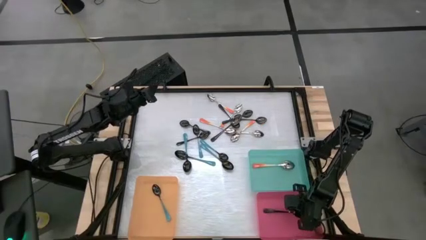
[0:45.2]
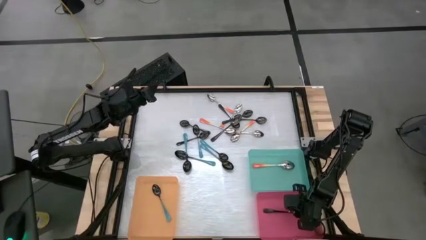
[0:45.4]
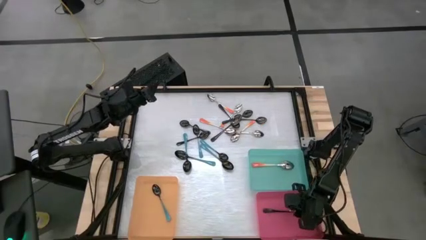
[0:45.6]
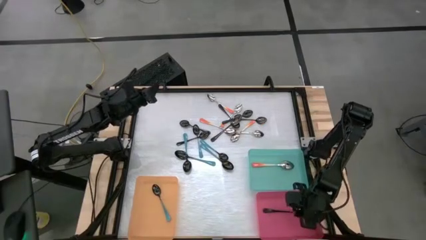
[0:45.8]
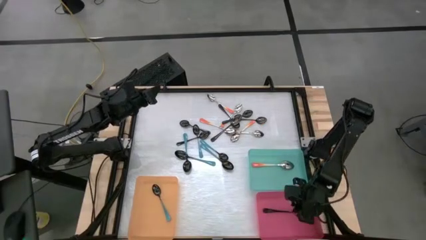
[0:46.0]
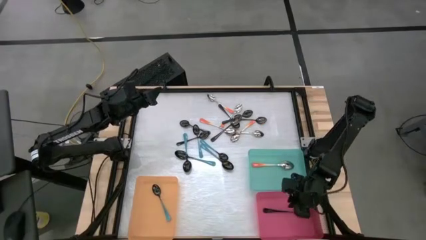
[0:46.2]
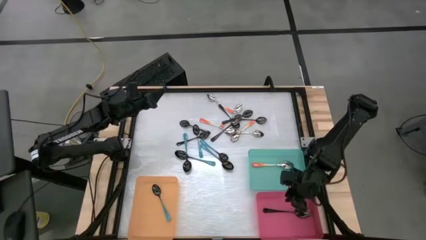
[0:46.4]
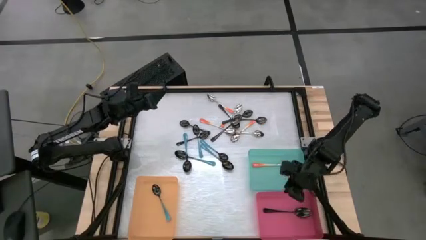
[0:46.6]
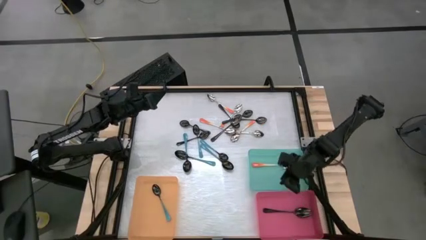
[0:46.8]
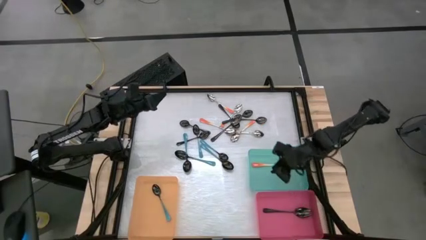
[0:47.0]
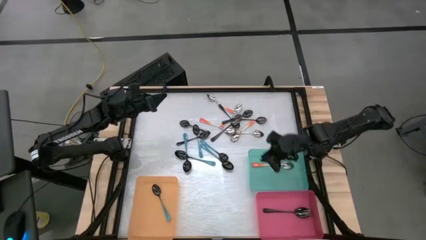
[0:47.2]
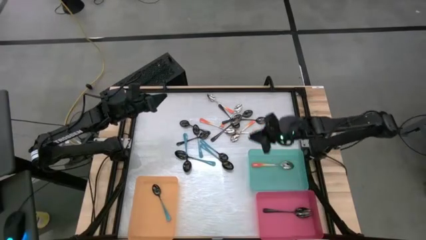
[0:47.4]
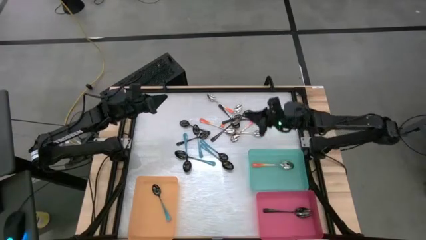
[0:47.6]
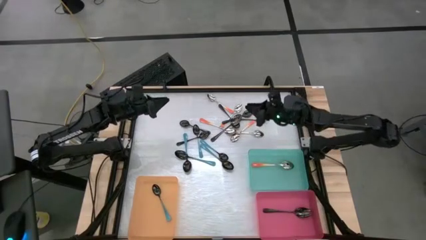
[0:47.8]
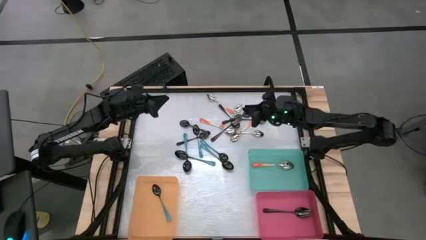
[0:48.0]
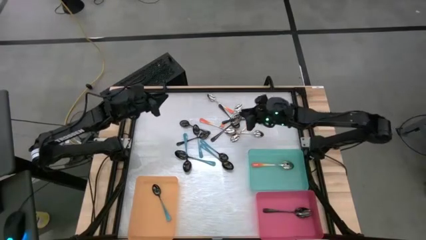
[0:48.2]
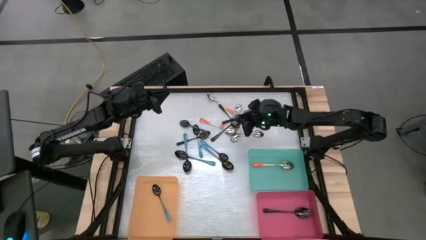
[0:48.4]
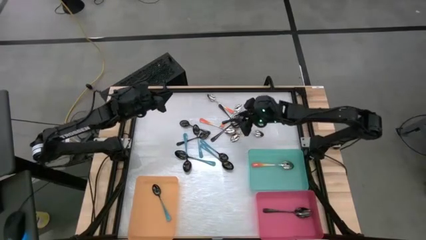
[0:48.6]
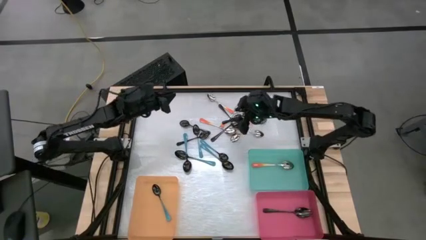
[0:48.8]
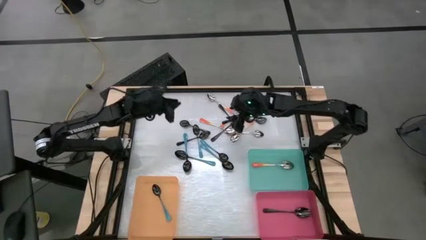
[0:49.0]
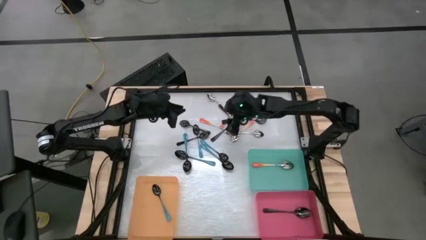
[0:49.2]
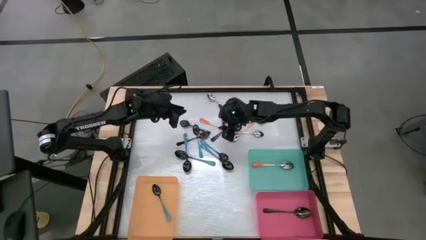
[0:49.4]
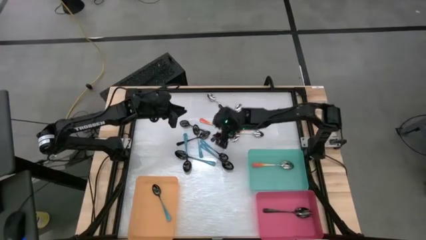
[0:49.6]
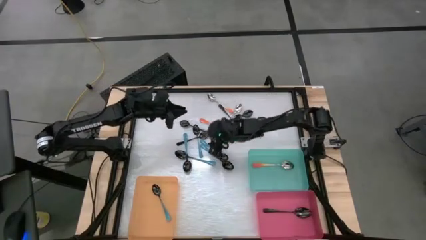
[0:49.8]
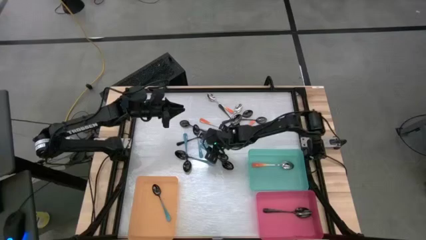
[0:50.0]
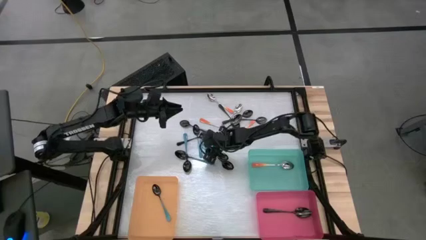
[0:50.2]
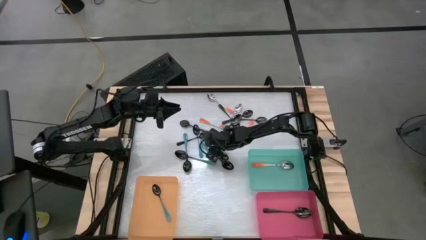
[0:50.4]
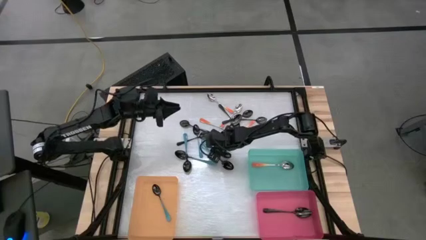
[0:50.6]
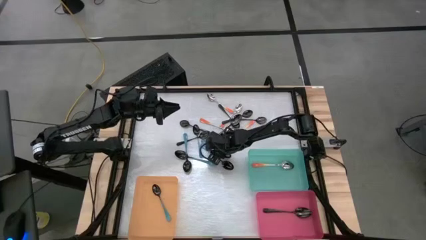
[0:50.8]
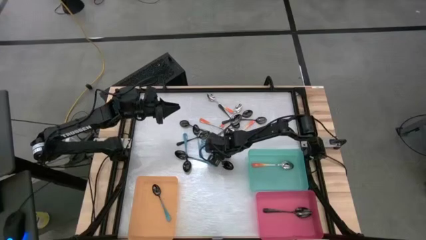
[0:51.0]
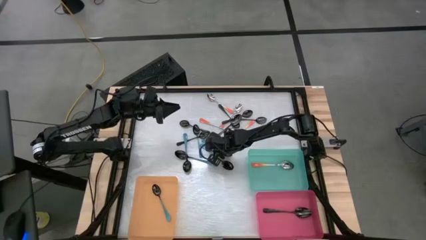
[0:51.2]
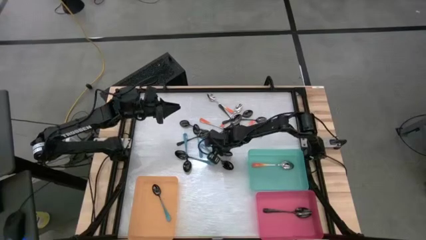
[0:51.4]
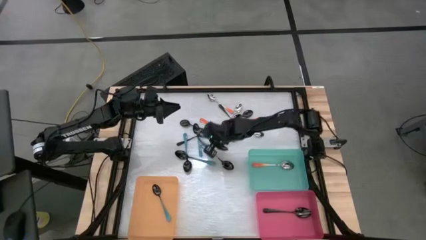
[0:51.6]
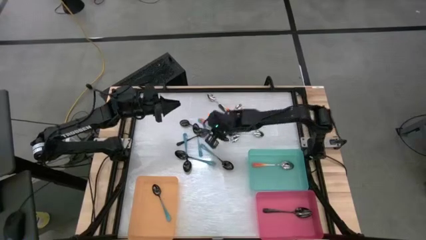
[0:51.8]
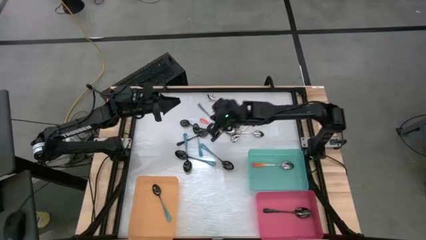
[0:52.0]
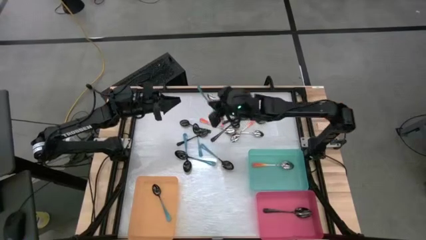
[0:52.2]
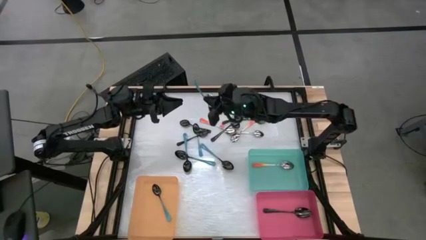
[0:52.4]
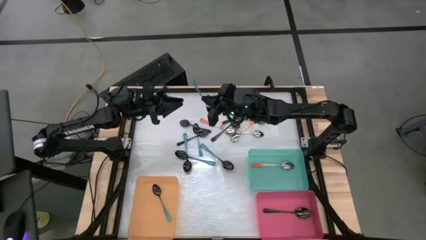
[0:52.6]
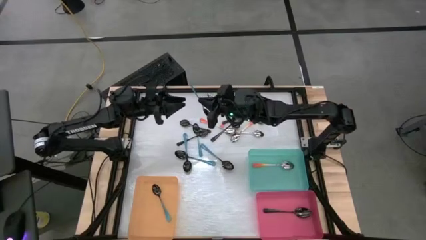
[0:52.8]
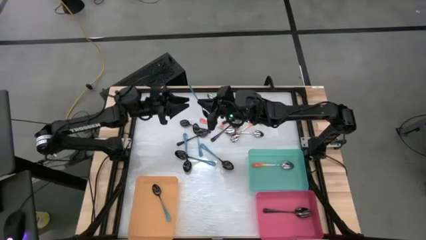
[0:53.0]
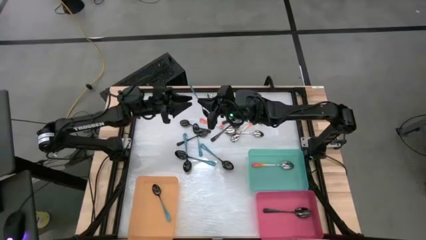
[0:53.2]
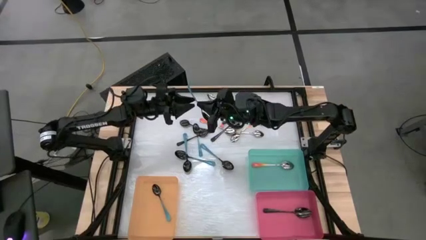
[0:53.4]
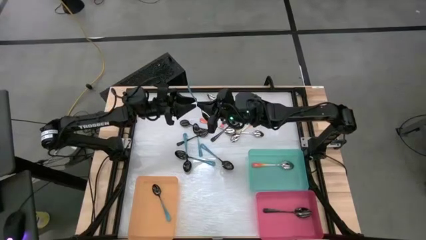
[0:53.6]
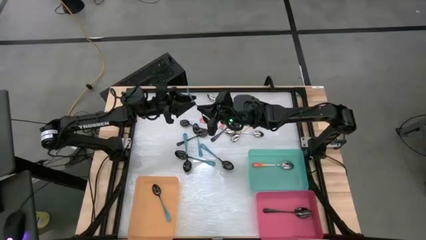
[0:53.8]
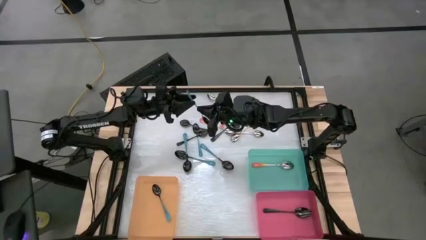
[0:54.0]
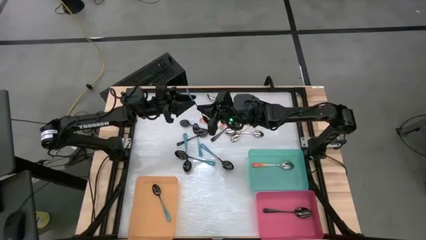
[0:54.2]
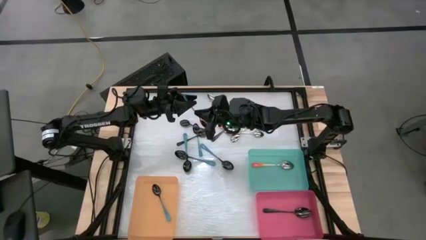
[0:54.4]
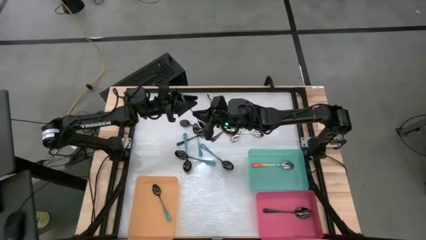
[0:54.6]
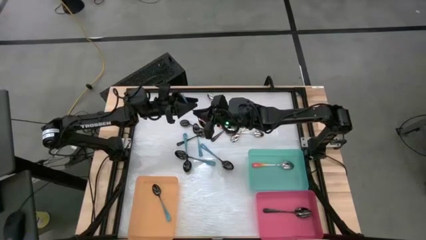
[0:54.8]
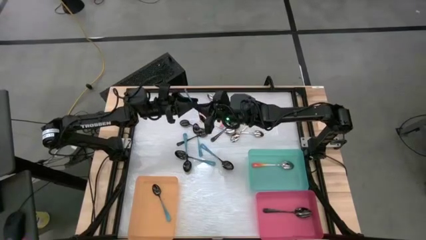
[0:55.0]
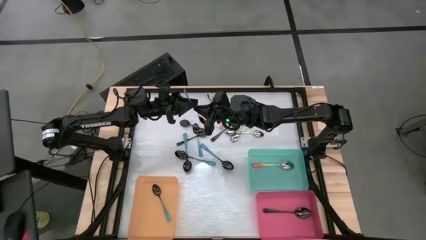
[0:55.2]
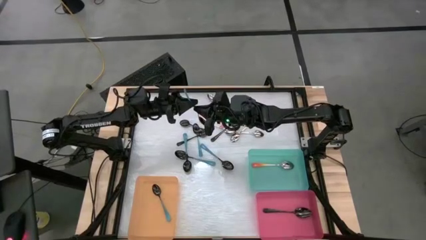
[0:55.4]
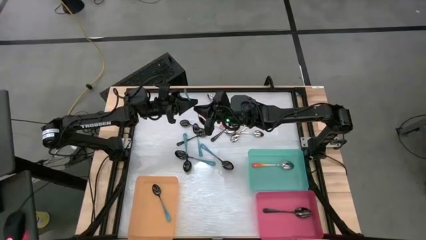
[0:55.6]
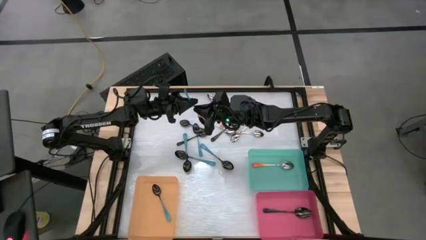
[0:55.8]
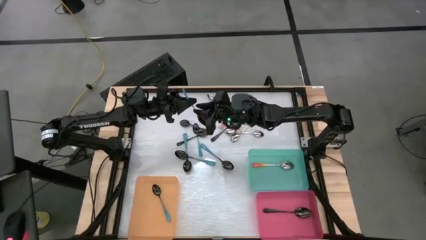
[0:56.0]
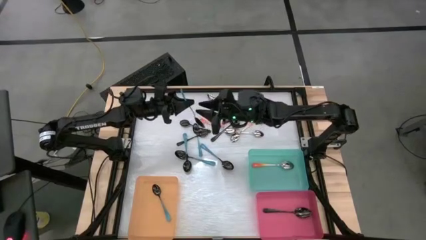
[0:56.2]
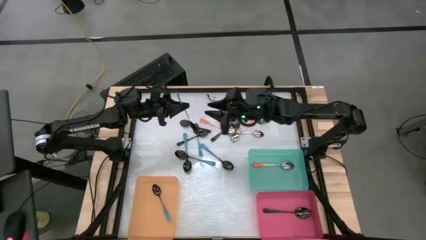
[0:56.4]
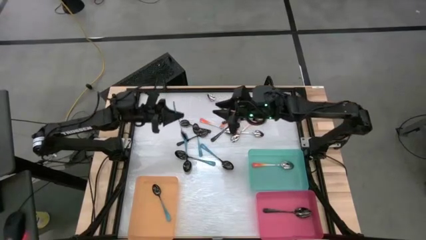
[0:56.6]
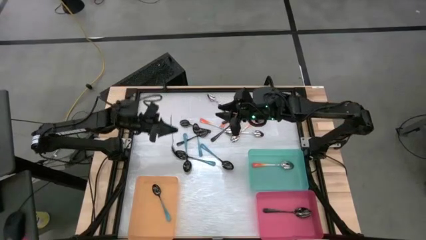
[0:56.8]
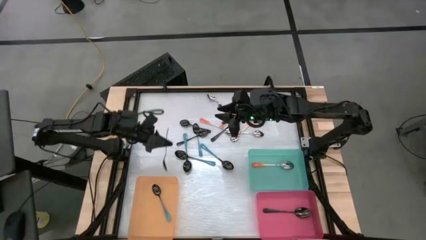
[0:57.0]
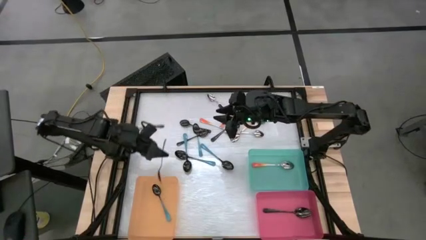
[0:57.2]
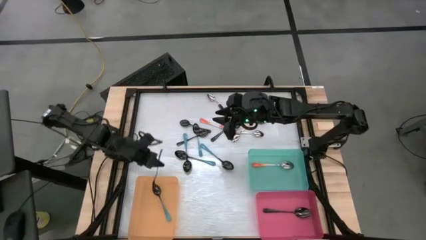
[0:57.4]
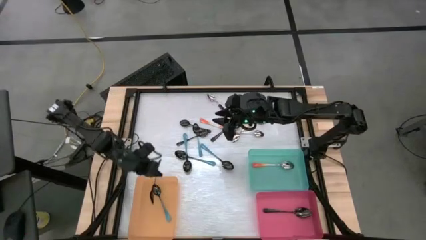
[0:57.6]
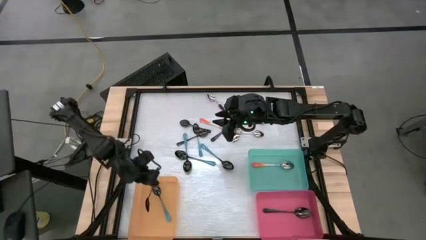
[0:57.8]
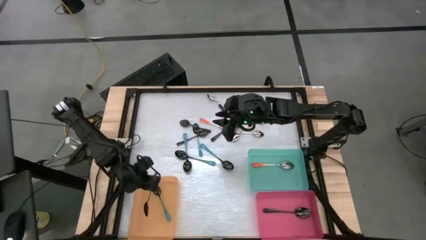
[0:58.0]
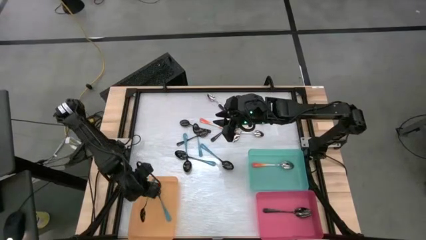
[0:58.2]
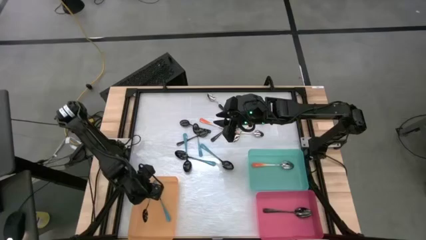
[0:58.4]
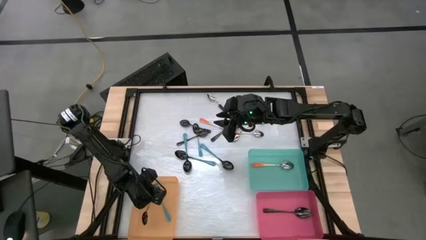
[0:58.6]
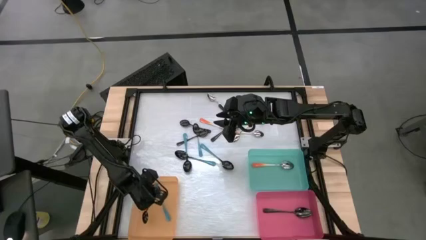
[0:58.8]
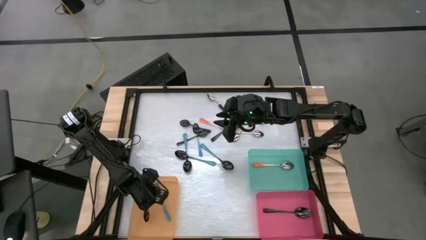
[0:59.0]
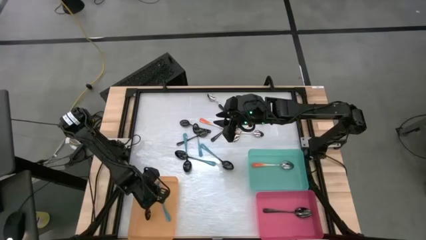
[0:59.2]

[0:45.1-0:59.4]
Task: Sort silverware by color (type)
Put the blue spoon into the orange bin
